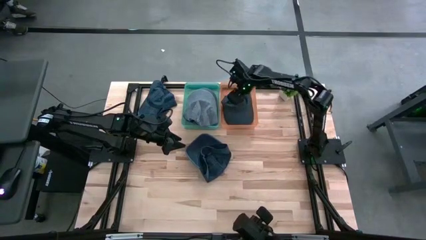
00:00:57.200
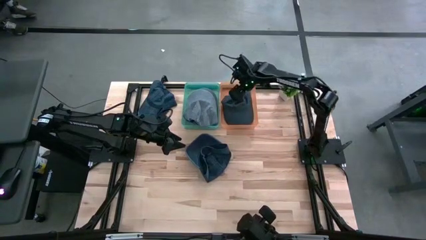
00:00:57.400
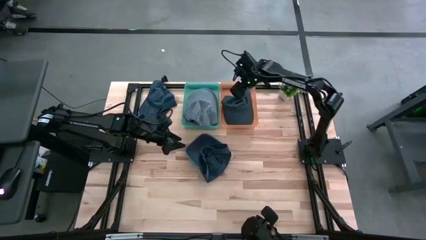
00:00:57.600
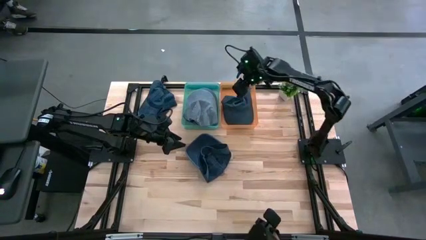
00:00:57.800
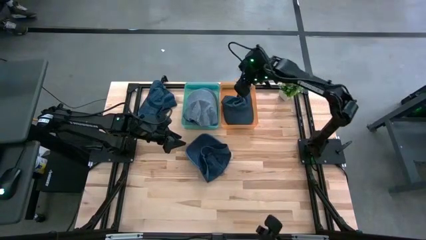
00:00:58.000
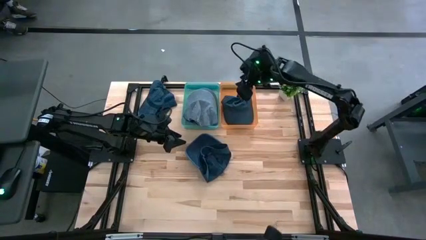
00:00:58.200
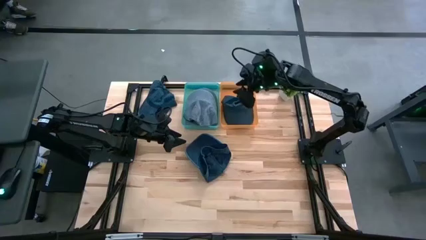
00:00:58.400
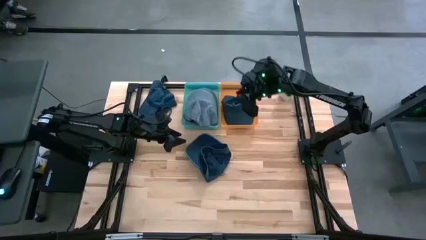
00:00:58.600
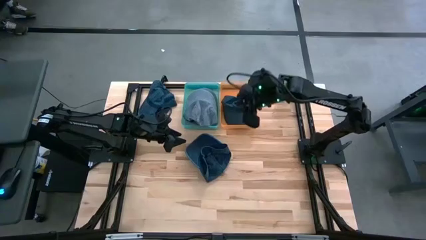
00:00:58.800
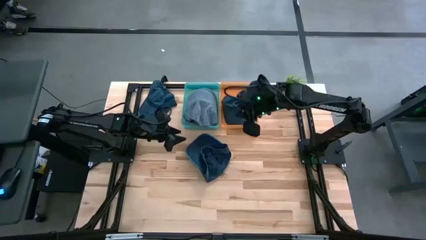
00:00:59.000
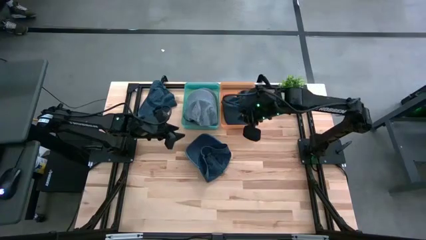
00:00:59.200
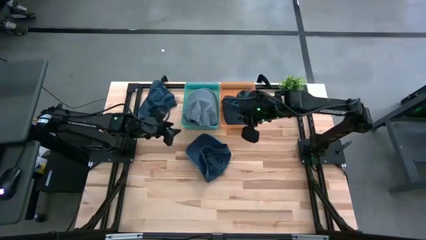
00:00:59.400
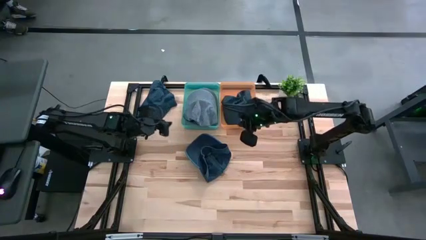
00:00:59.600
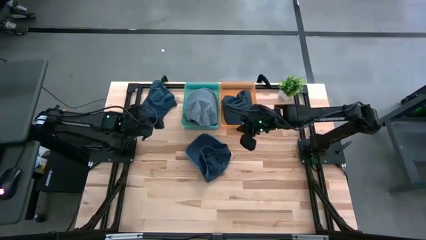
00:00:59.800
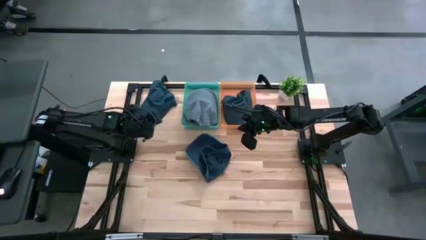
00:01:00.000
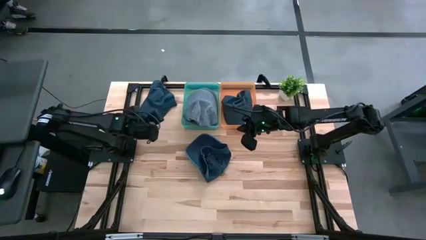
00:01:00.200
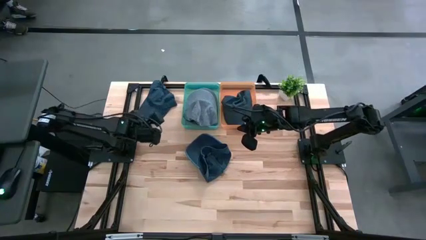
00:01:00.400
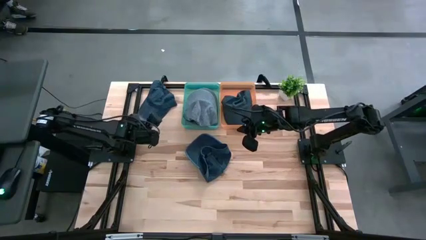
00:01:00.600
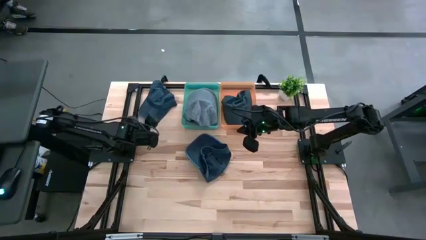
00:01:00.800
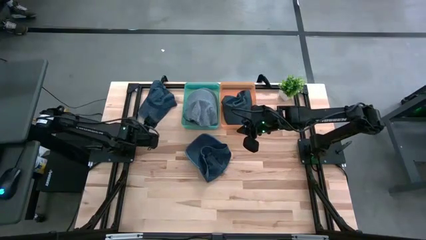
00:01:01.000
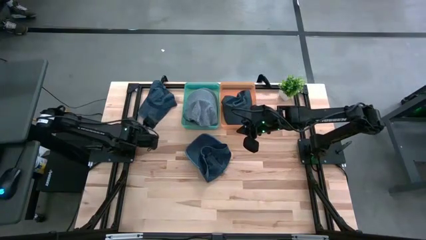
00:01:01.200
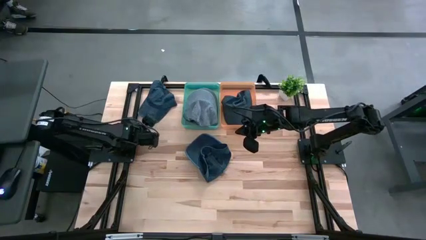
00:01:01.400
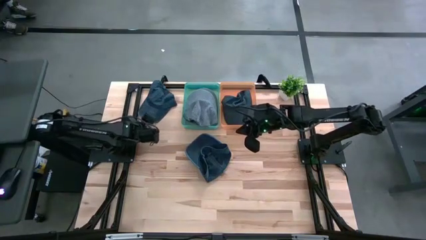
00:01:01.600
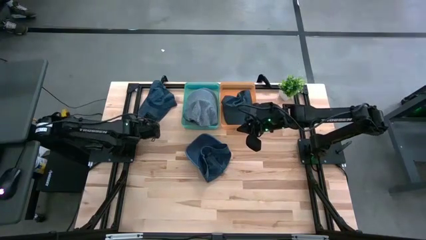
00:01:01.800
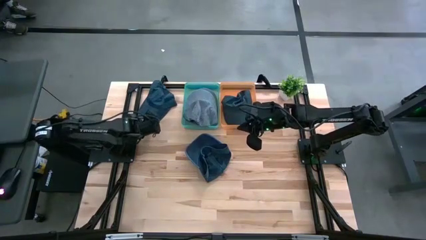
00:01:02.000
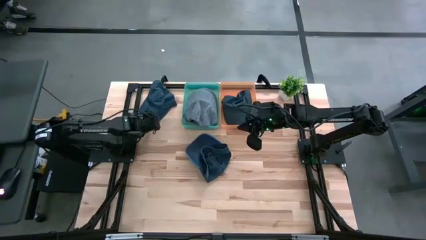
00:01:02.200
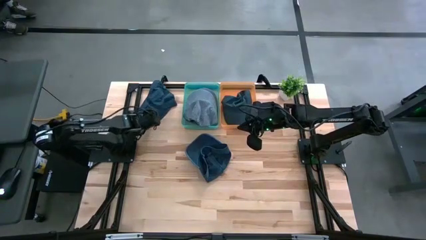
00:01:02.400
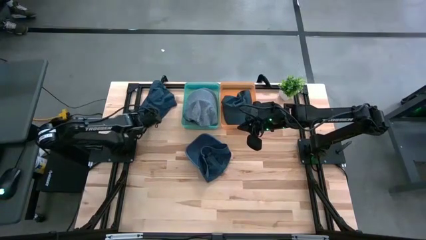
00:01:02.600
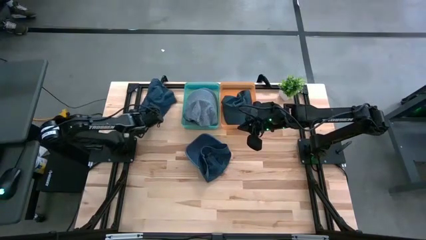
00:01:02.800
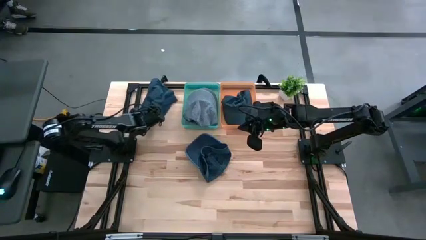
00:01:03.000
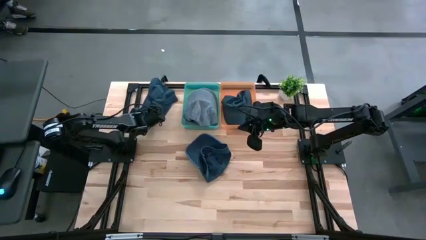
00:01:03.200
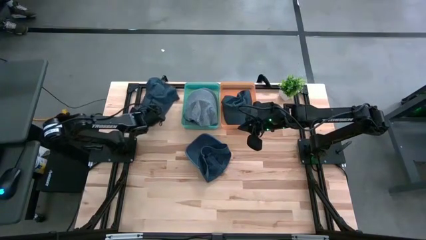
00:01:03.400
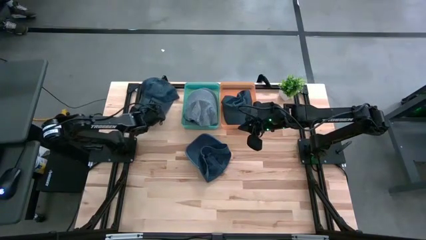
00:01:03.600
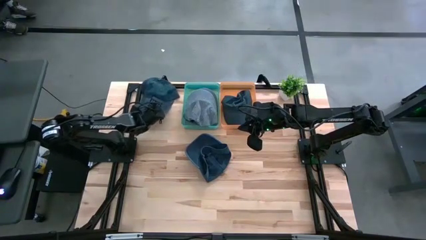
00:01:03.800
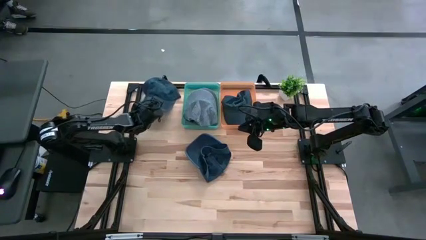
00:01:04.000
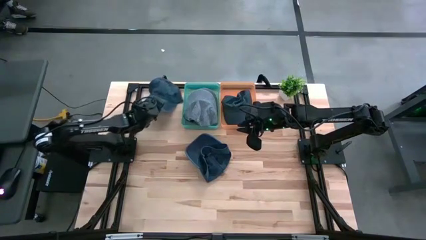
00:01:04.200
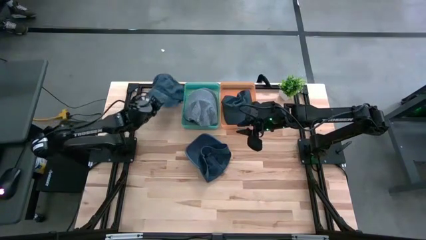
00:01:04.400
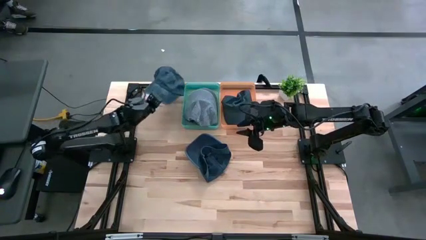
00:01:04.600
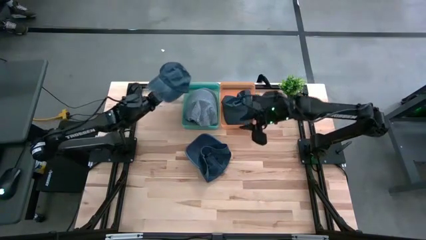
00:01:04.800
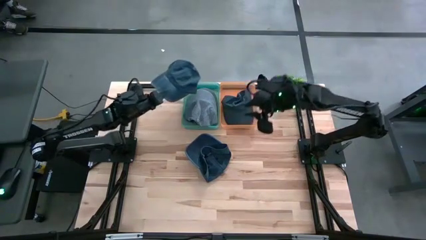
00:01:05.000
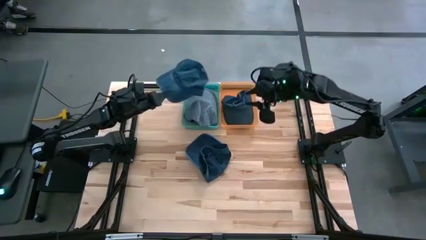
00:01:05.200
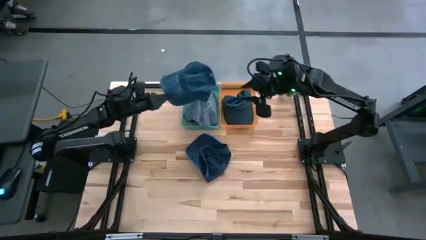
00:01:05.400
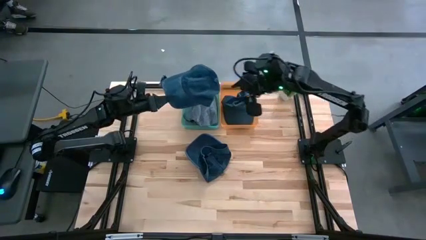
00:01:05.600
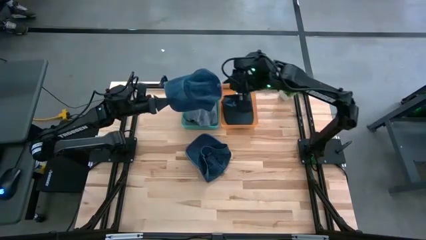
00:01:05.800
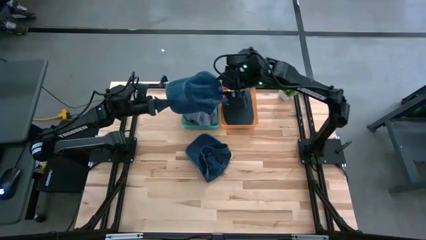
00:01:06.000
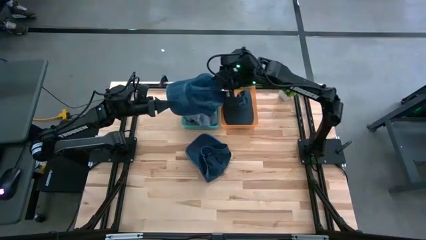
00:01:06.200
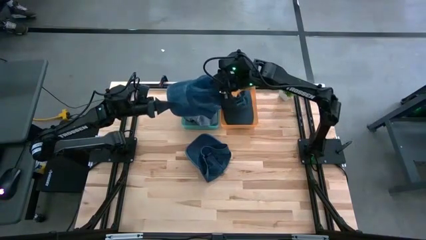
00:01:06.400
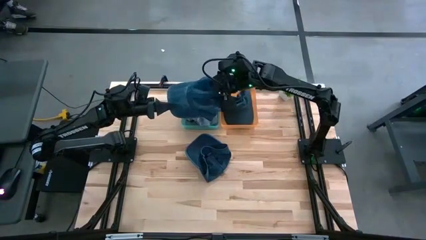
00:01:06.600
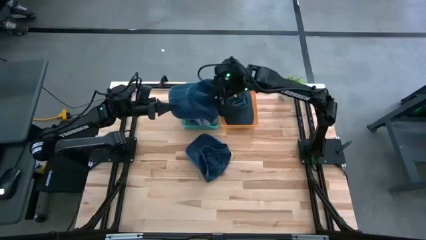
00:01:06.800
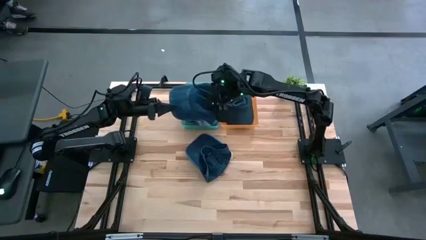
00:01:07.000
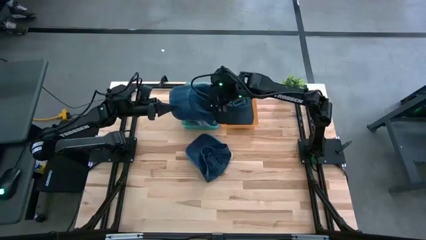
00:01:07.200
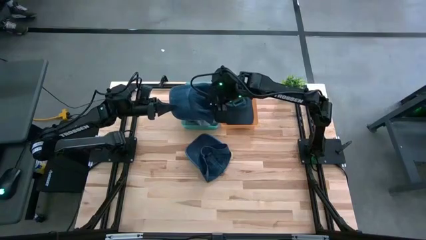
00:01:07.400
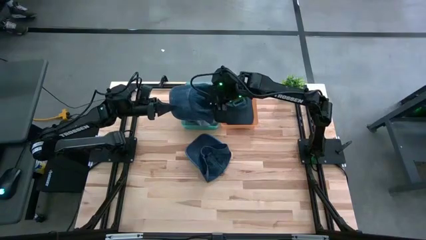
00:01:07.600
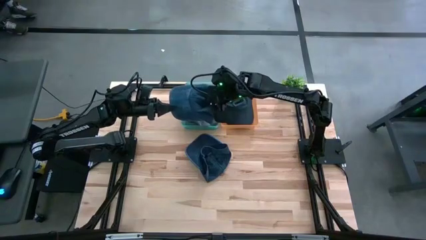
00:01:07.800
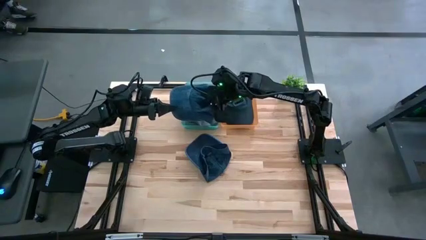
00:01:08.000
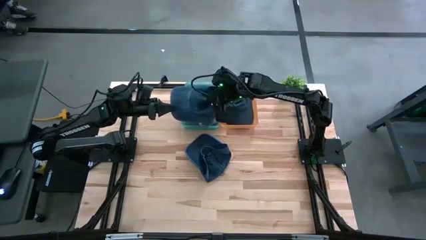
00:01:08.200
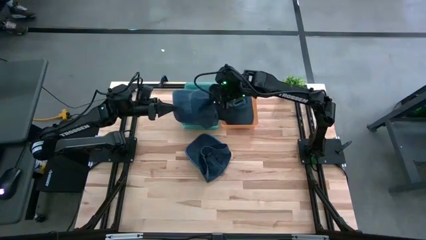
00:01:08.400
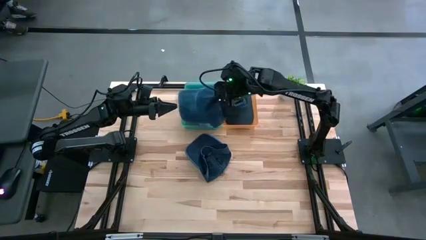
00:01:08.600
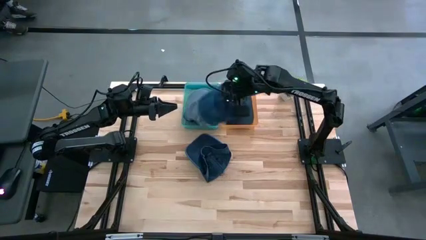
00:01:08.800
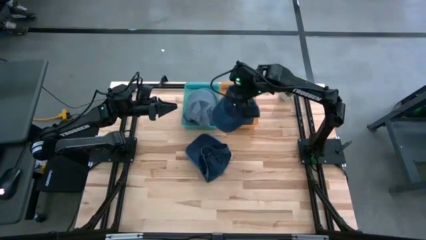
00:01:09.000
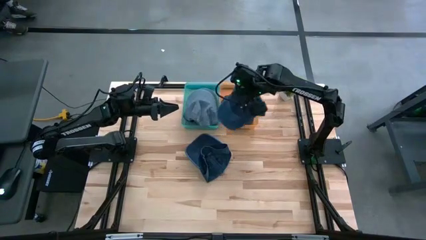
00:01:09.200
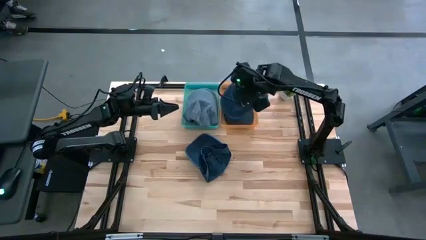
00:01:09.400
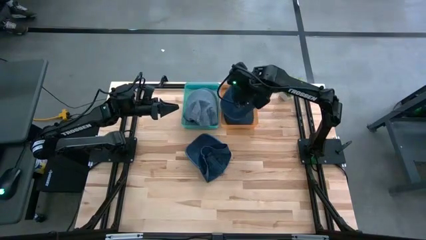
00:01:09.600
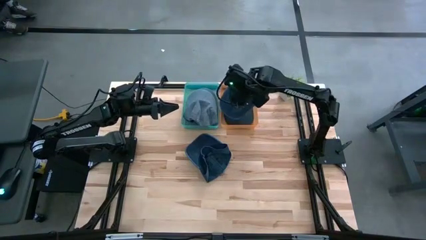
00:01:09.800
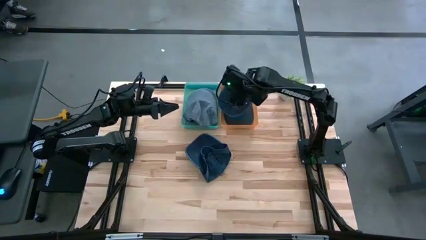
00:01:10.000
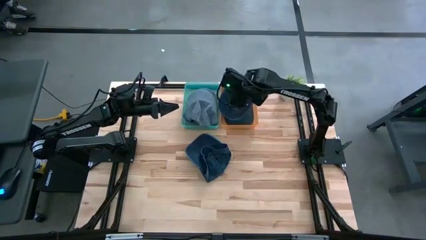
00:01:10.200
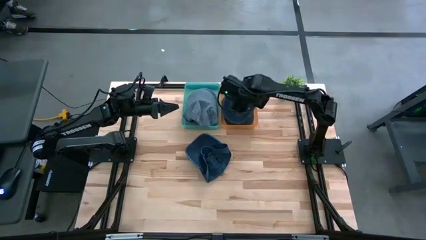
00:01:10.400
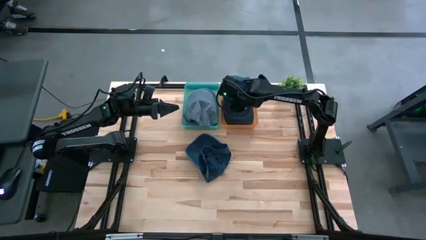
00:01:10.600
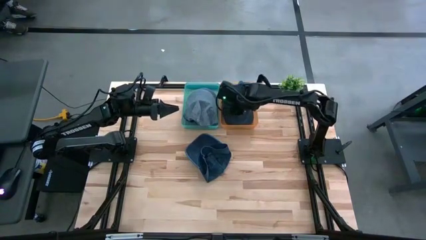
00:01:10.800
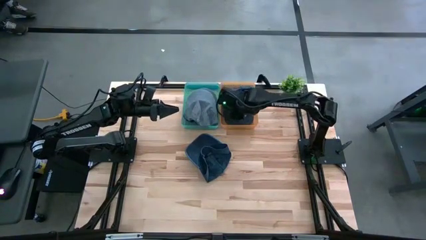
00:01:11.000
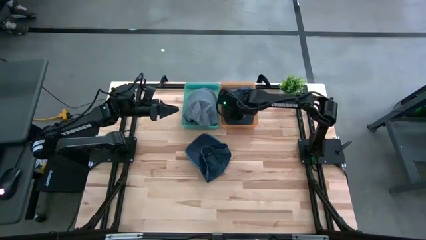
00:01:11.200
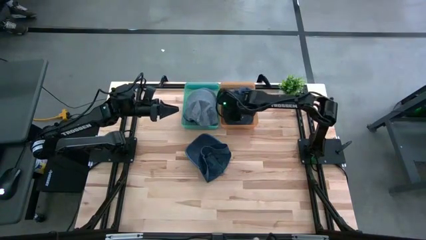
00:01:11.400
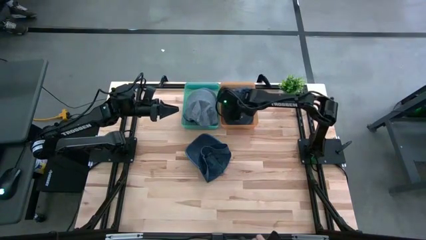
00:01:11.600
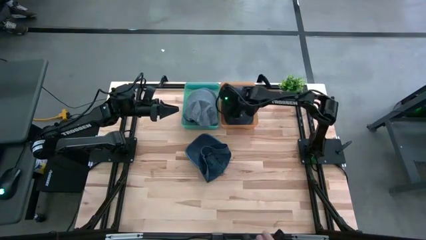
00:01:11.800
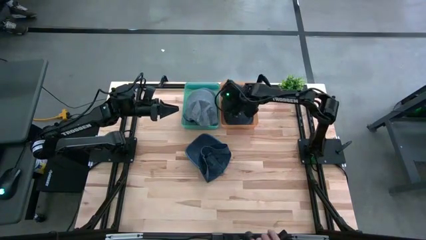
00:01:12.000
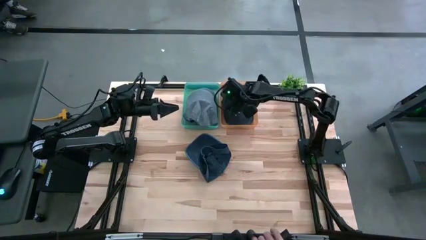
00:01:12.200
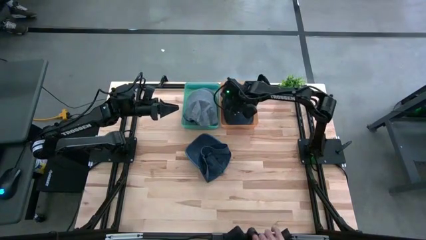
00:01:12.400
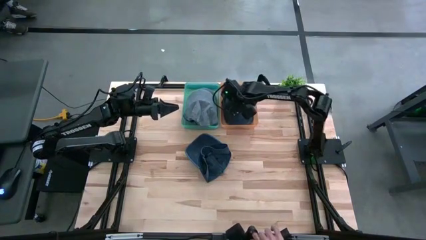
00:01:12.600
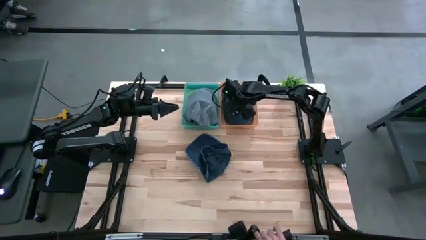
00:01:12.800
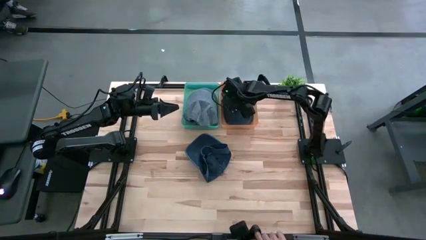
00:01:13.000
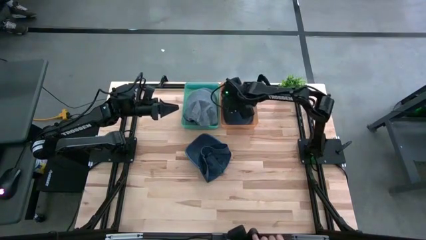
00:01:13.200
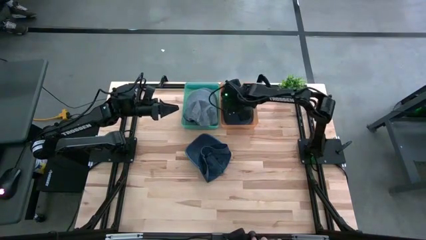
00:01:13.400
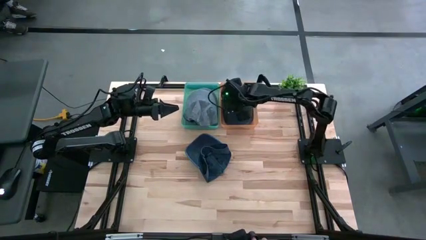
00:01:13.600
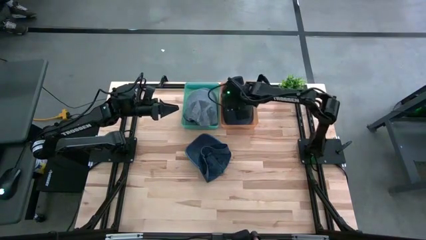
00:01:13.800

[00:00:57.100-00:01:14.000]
Task: Pick & Place hat
Put the top black cap into the orange bin
